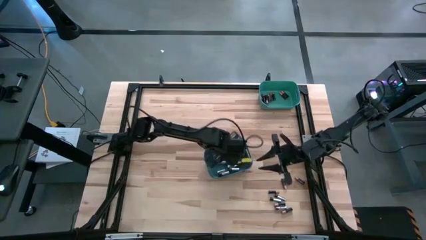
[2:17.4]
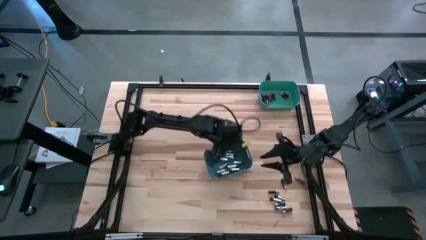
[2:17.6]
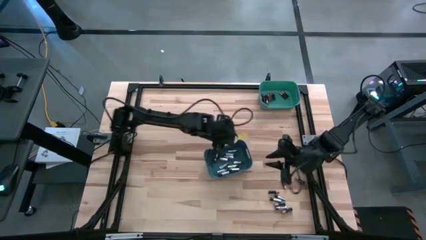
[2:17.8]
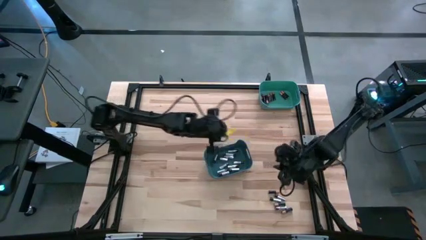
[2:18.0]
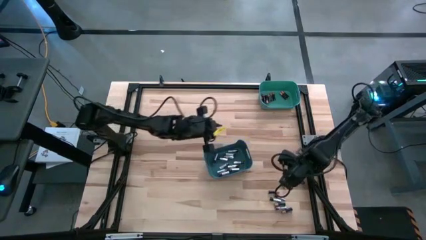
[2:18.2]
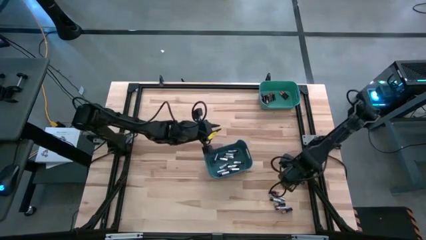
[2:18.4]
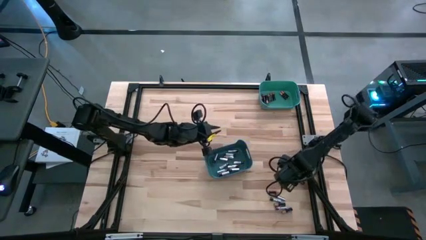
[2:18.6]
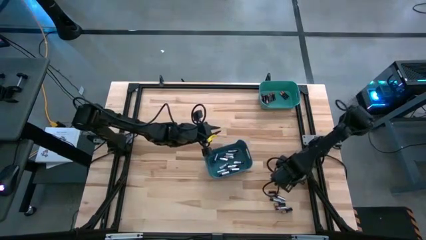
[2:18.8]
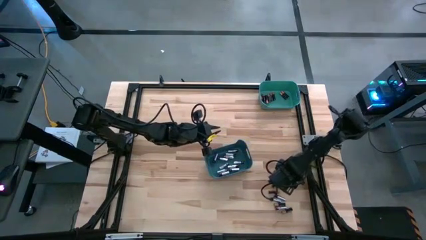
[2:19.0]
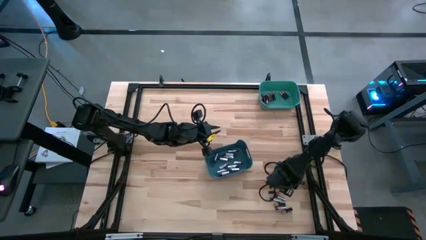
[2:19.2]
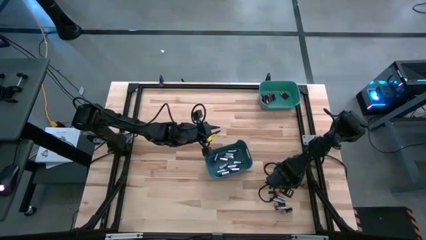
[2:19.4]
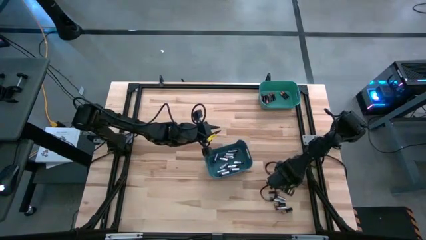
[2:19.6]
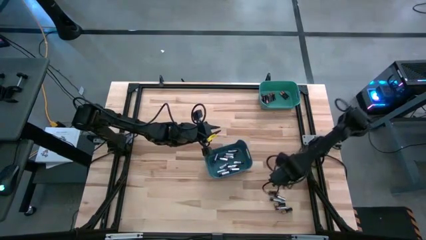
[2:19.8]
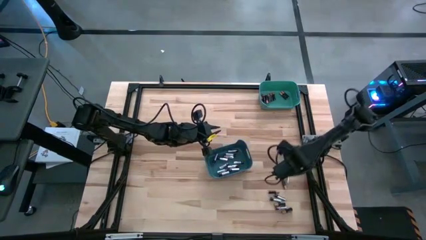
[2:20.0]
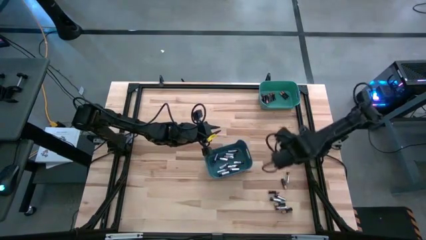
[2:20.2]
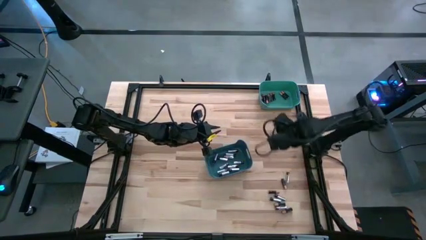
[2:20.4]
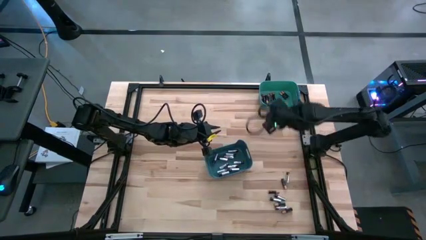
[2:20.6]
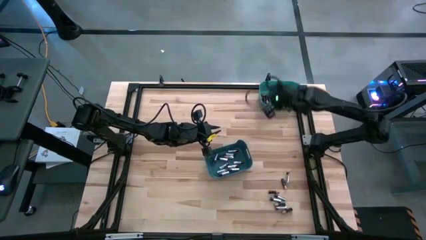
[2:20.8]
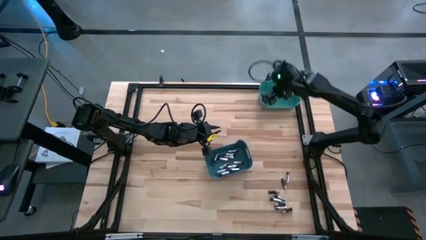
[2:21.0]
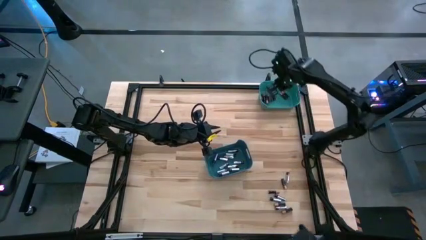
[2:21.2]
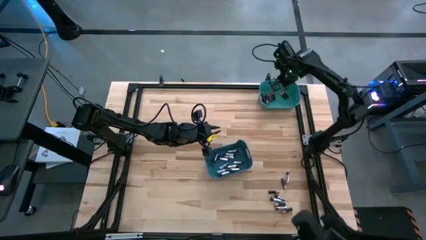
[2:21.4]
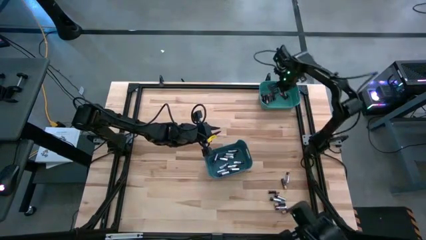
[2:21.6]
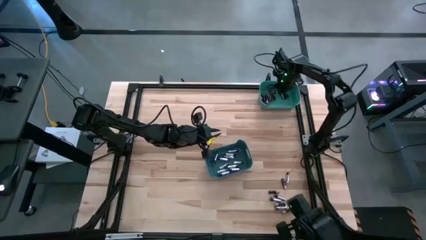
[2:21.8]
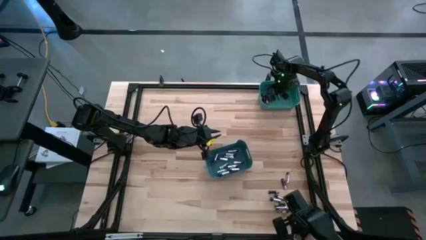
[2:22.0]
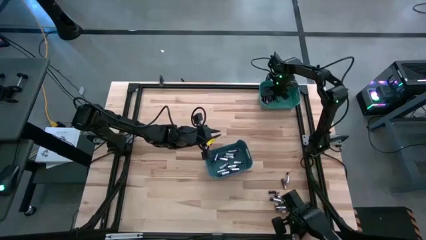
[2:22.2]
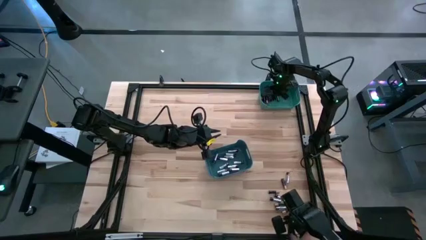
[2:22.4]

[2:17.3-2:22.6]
Task: Sort batteries
Put the black battery into the green bin

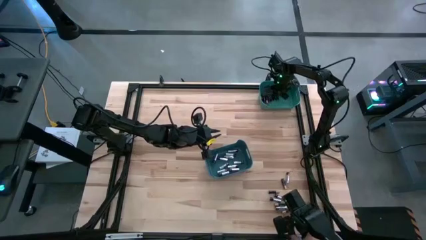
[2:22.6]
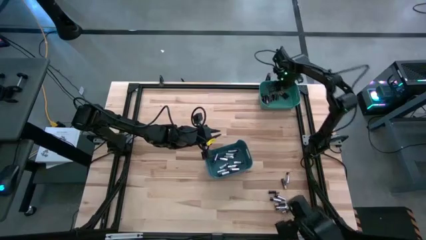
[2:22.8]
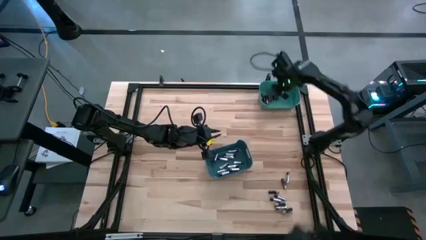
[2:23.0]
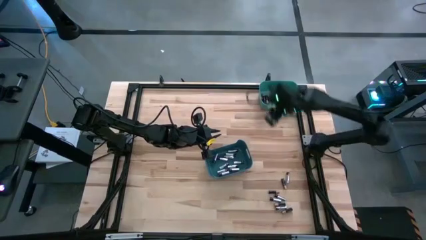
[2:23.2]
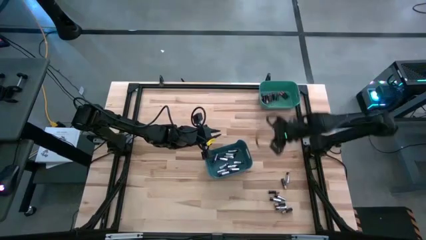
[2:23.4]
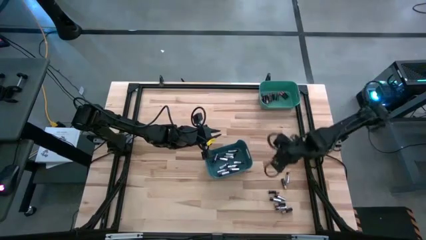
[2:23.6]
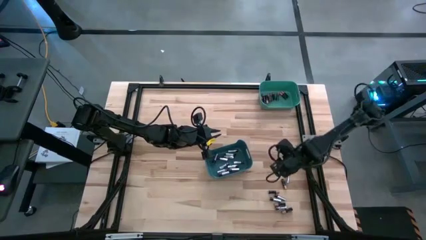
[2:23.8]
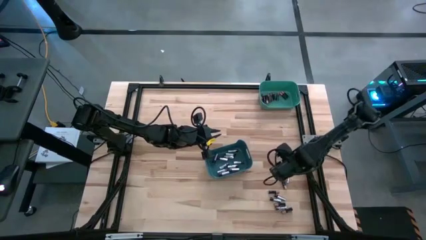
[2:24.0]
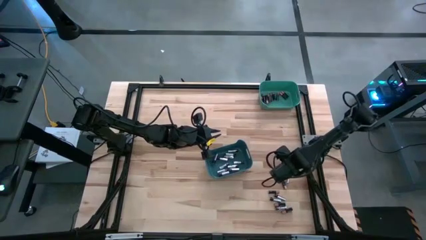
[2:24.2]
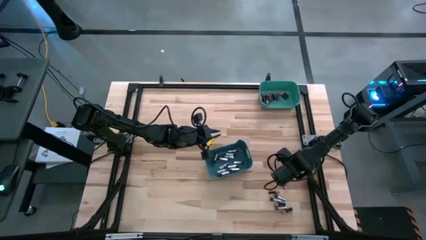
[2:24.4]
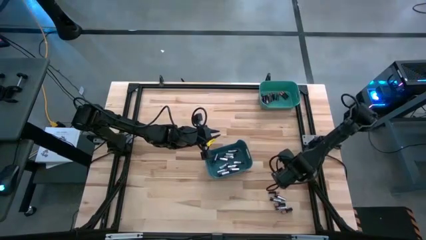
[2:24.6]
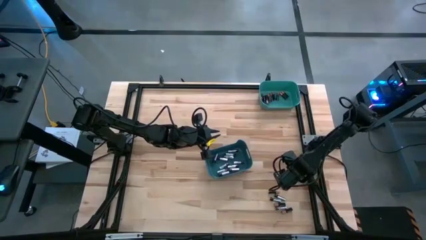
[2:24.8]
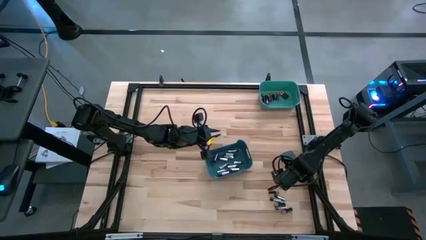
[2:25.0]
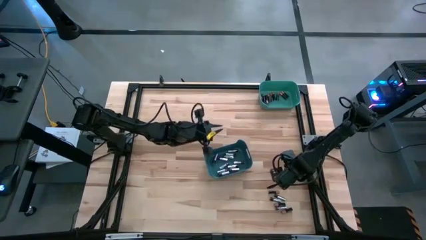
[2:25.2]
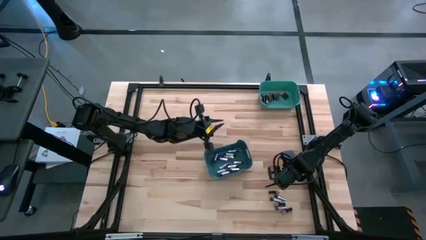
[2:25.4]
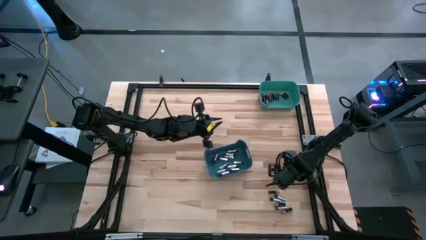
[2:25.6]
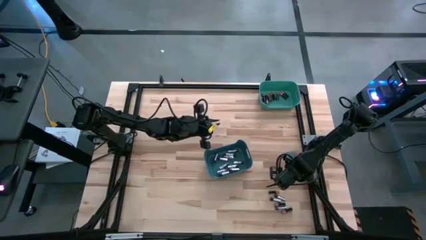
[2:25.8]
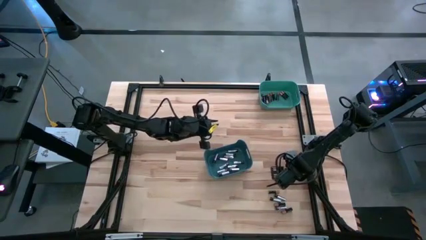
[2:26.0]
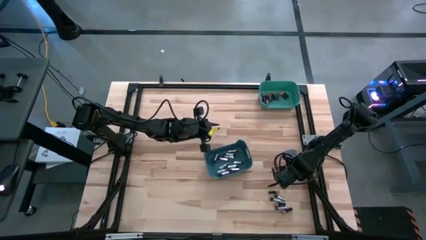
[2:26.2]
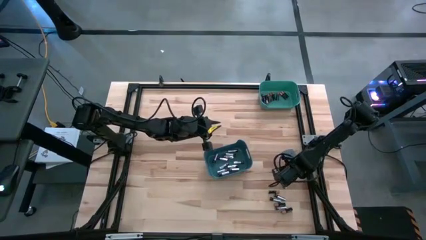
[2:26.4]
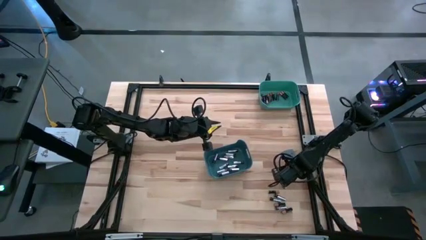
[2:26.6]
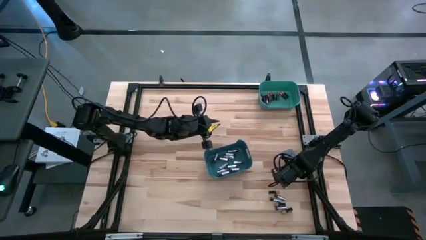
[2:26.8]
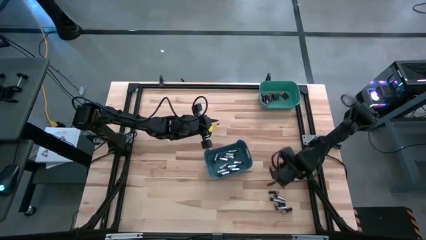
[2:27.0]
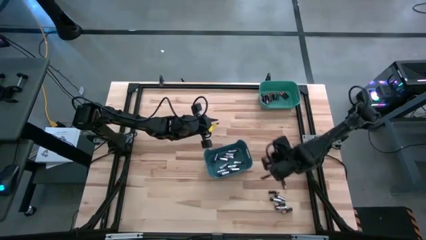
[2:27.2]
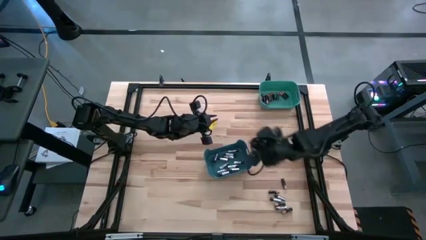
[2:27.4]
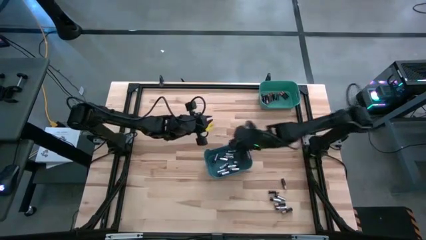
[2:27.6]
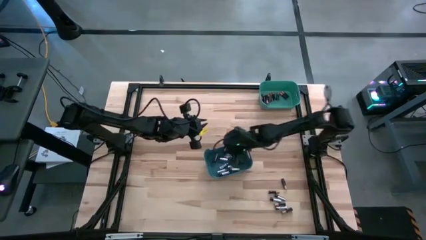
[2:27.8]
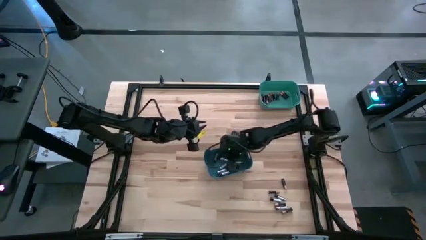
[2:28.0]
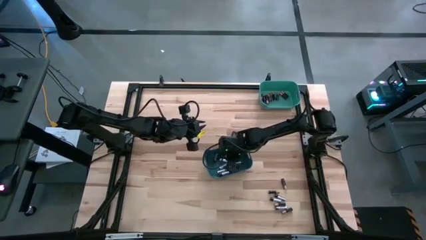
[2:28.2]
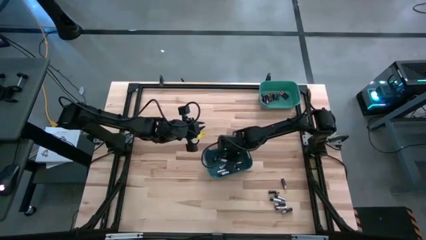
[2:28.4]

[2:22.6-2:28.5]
Put the silver battery into the blue bin

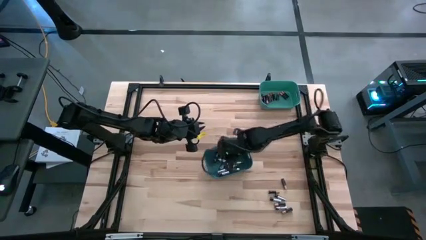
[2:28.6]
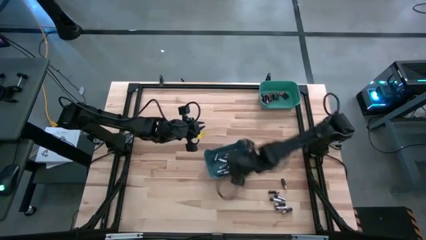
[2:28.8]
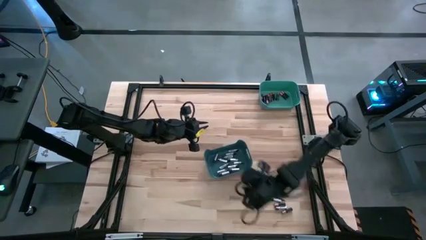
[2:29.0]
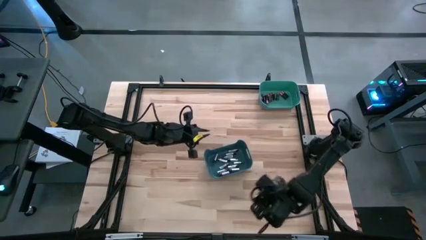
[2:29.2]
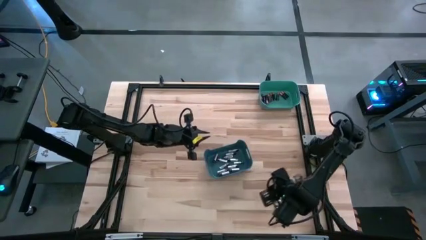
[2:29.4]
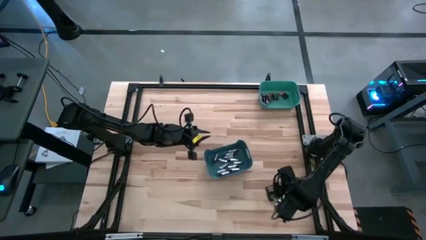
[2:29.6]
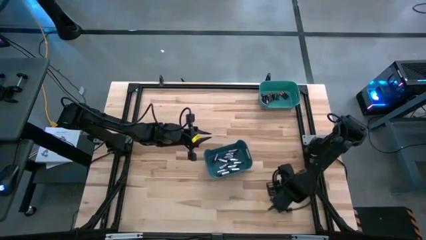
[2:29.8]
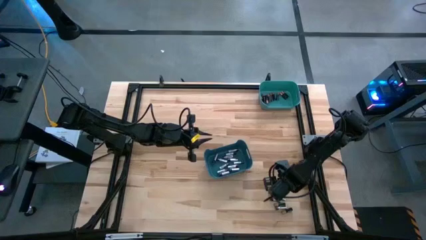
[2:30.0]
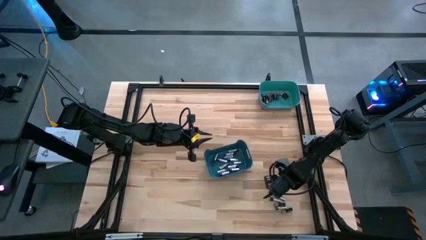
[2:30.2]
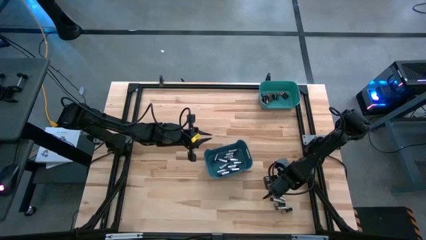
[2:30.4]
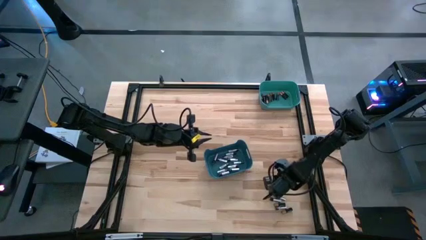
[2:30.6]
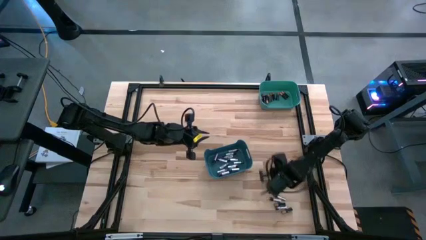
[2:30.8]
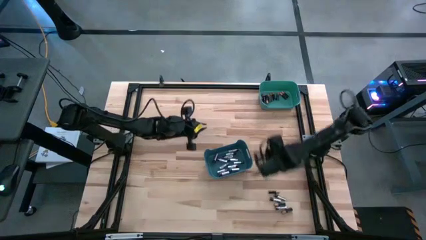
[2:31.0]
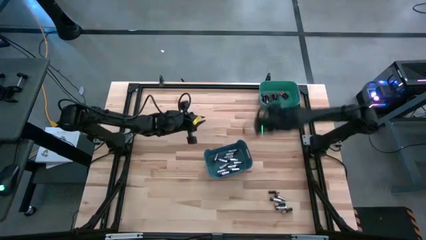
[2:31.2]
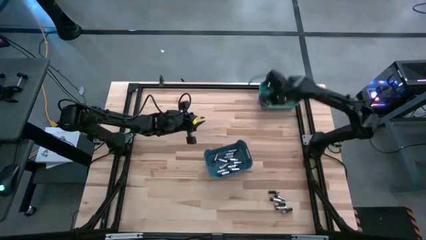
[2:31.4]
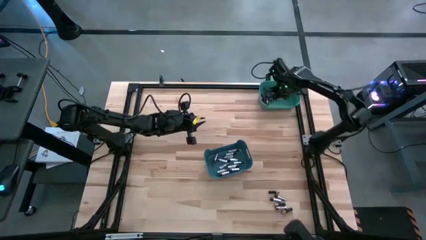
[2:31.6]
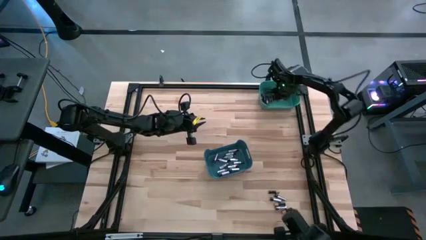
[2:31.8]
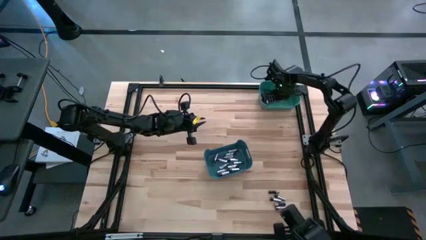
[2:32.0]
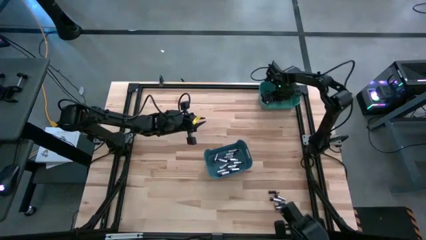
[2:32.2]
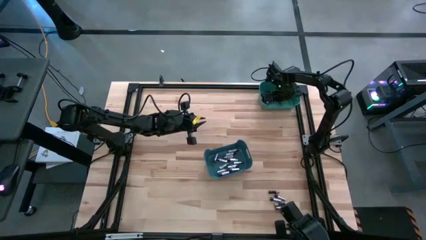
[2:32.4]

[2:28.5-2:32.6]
Put the black battery into the green bin

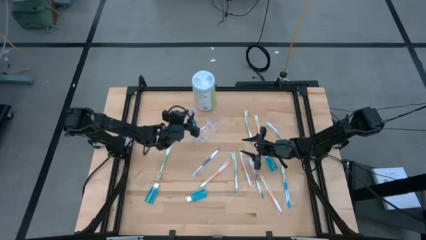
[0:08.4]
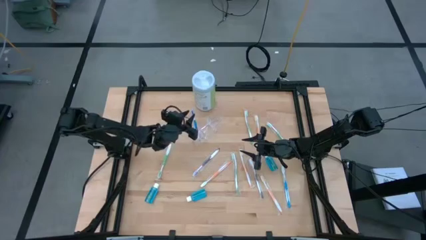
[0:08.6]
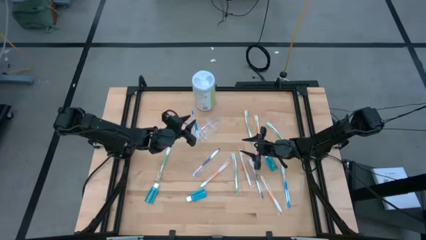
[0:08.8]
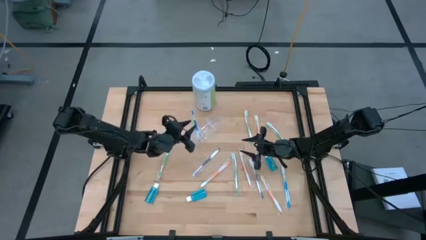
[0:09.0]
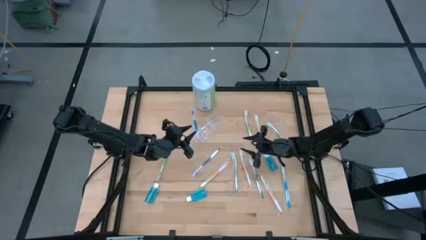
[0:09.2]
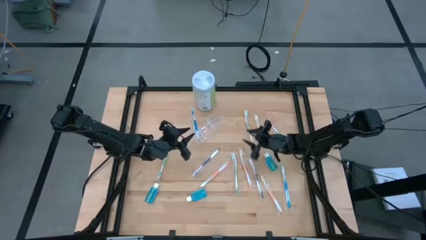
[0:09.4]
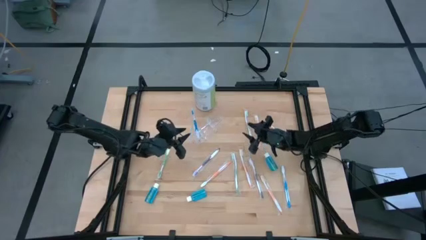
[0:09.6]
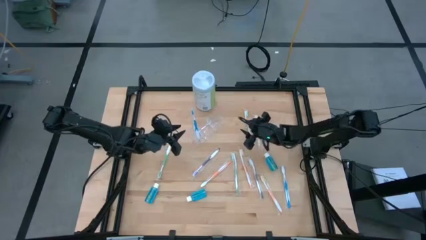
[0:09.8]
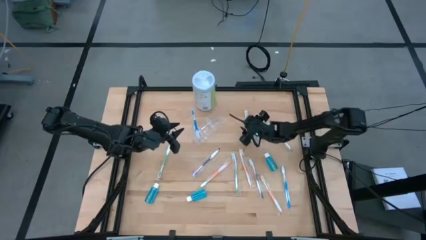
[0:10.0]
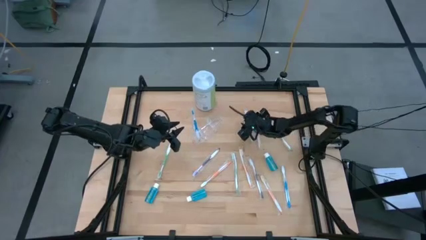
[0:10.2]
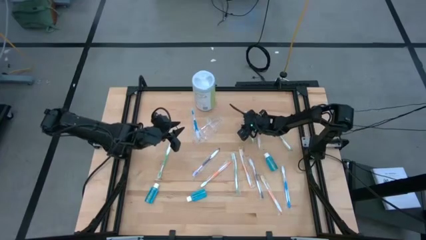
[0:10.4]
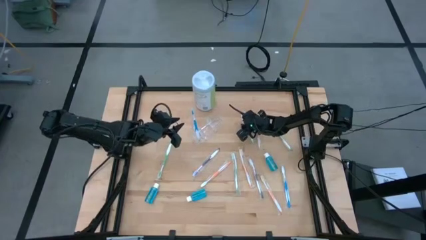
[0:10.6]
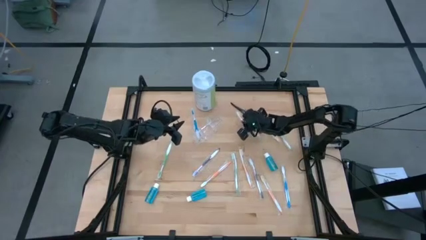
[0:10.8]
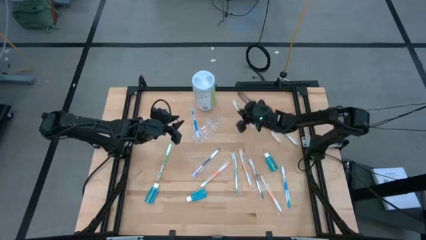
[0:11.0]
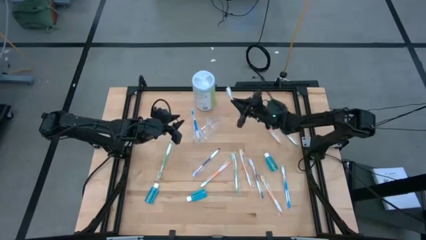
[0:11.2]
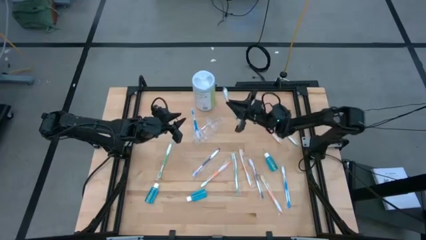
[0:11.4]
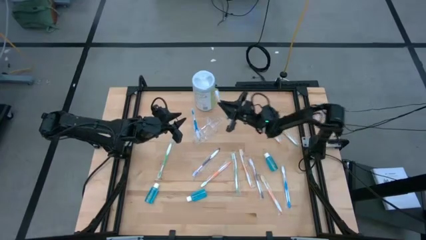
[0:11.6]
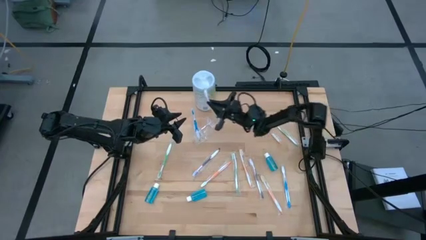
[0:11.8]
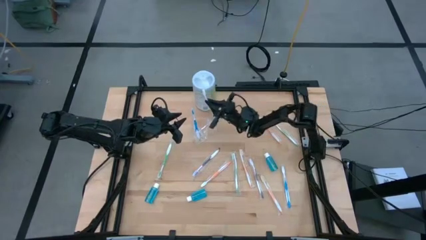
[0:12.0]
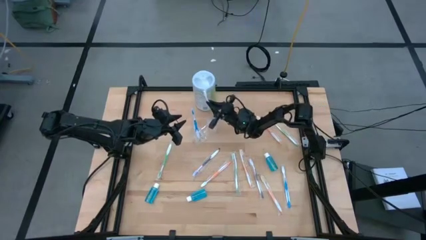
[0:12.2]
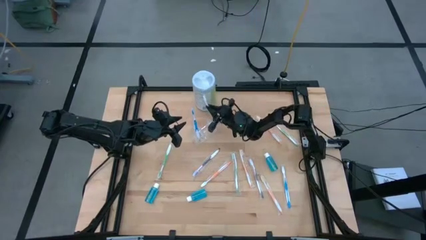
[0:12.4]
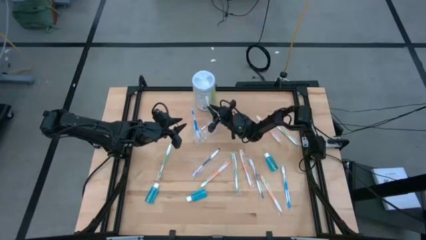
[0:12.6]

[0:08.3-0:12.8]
Task: Pick & Place toothbrushing station
Put the green toothbrush into the transparent organizer
